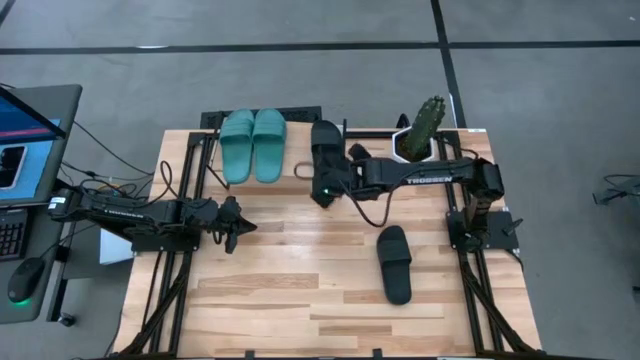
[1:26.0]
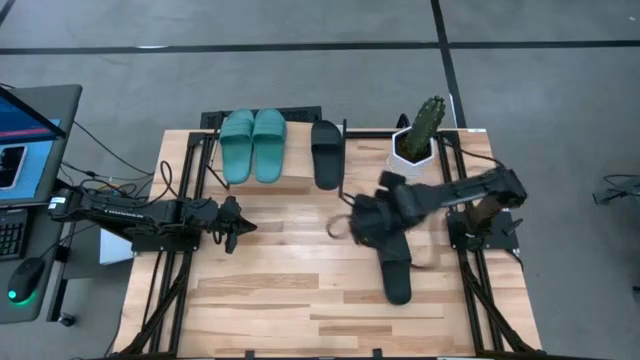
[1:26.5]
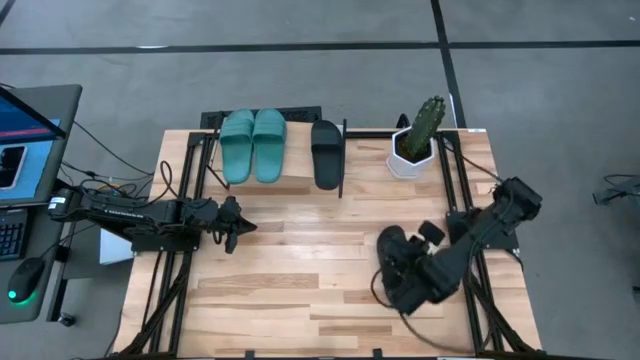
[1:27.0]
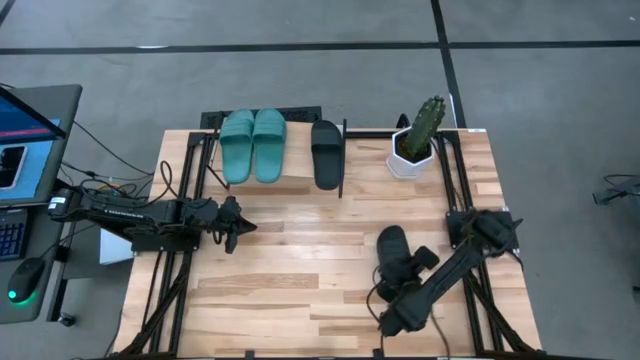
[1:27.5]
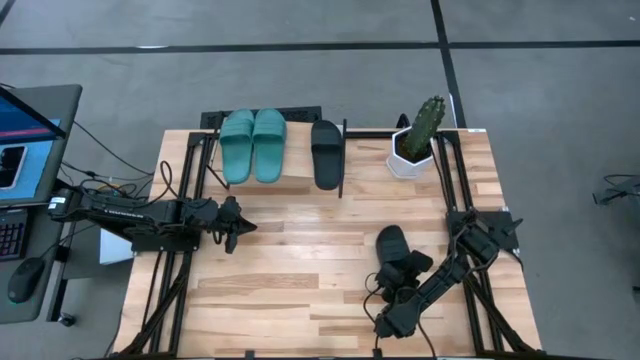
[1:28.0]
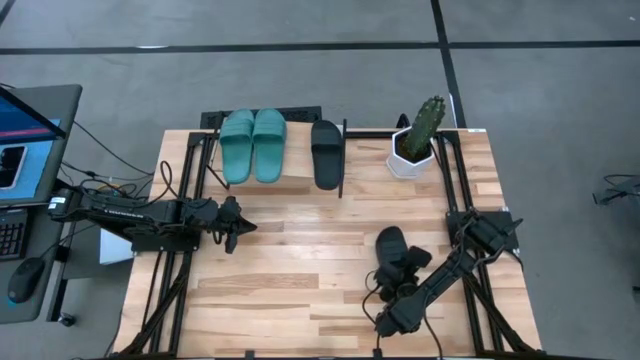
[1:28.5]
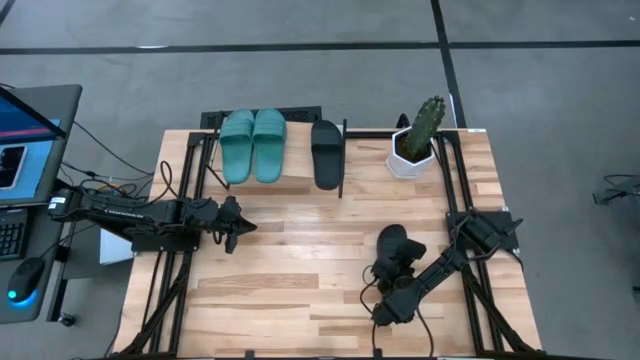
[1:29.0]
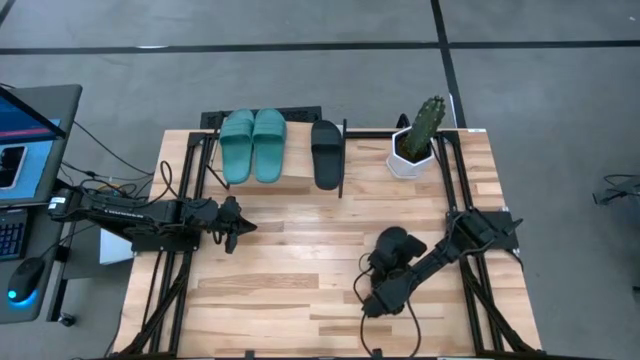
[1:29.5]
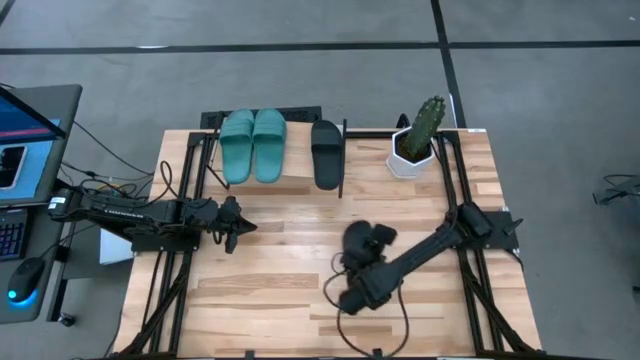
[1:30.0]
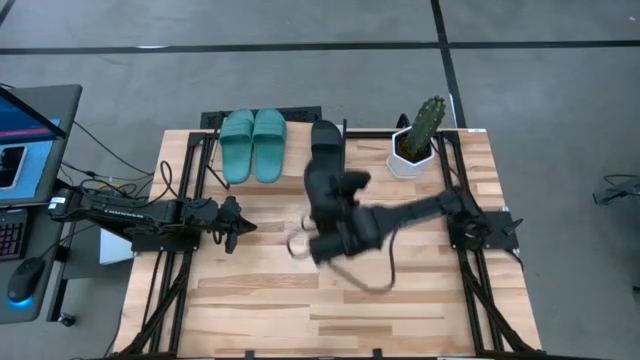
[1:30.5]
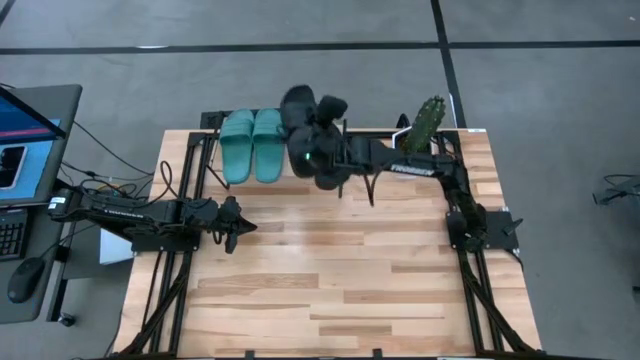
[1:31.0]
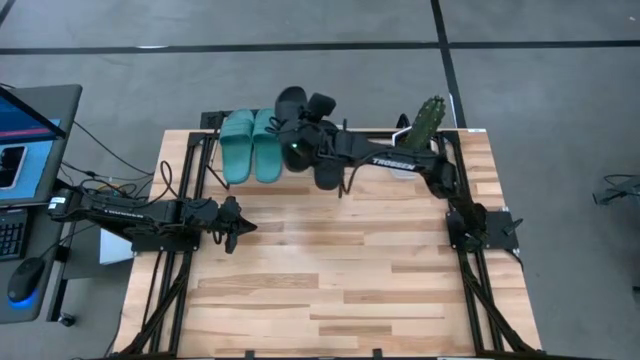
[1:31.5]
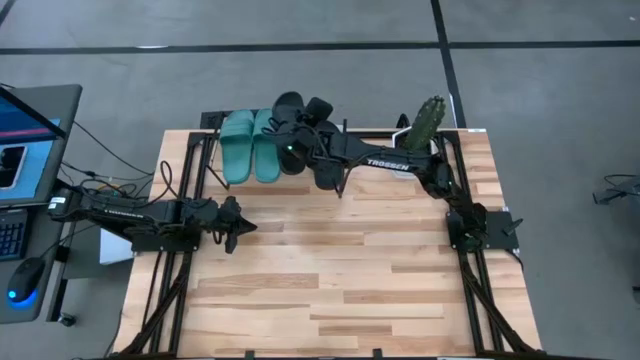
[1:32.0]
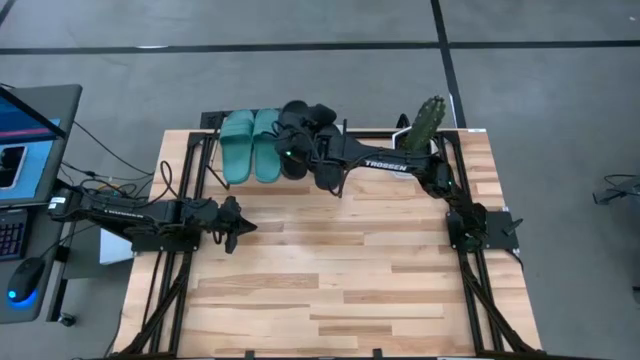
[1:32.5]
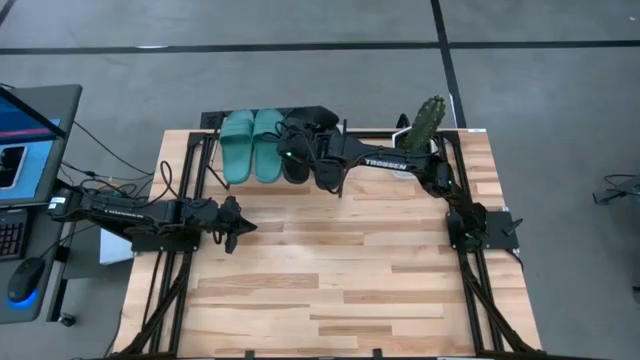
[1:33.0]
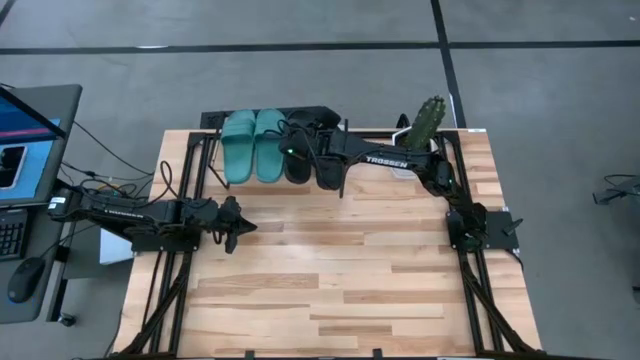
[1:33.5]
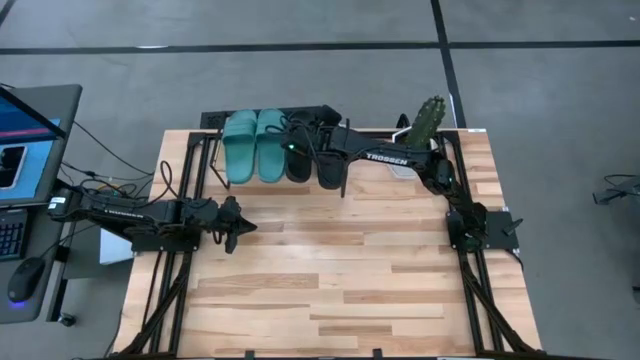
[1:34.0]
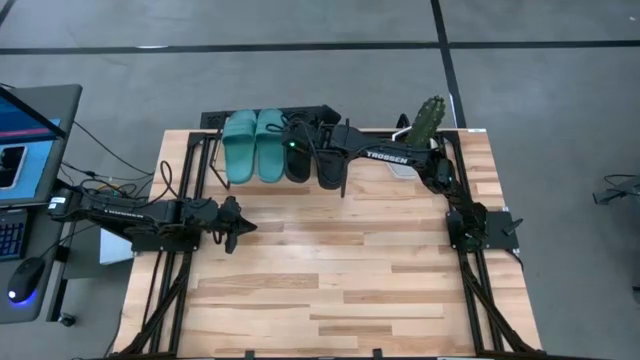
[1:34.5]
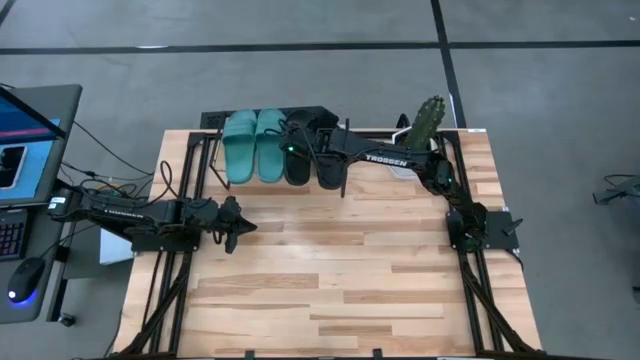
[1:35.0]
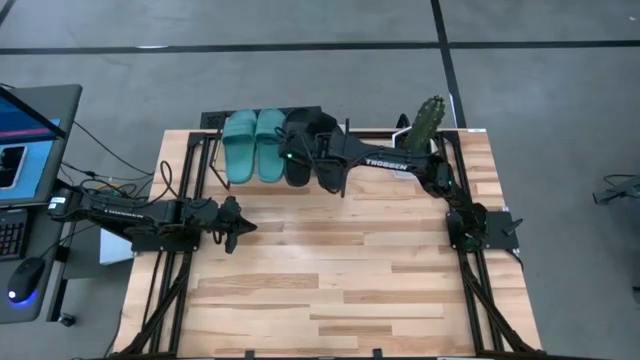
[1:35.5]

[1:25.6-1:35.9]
Task: Pick and place slides into the shelf
Put the black slide on the shelf

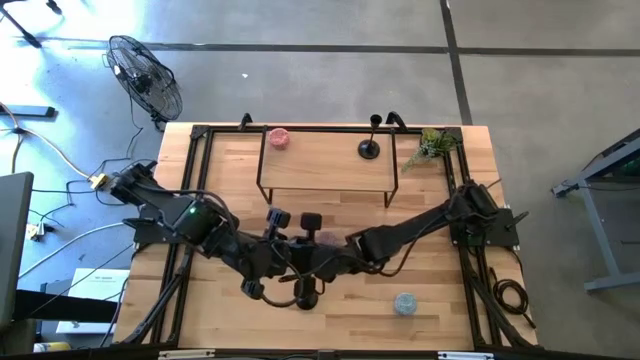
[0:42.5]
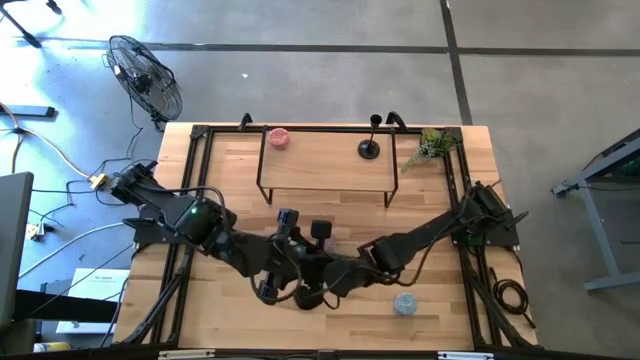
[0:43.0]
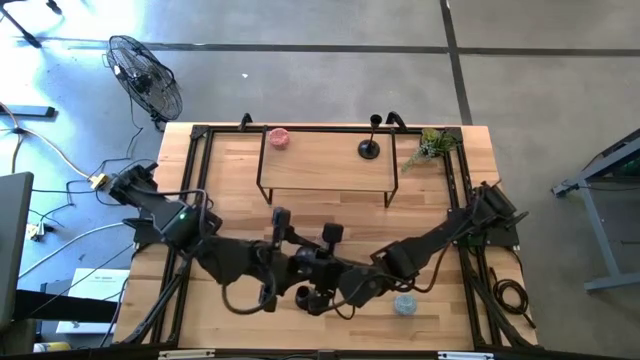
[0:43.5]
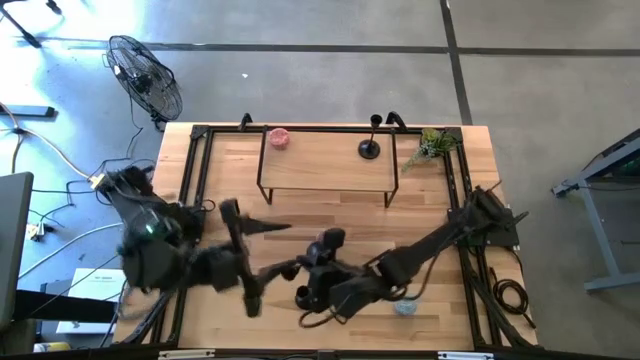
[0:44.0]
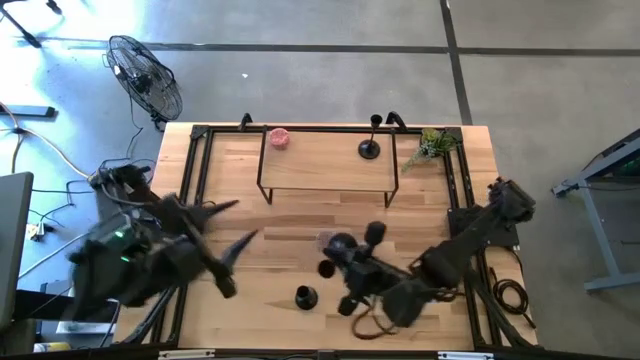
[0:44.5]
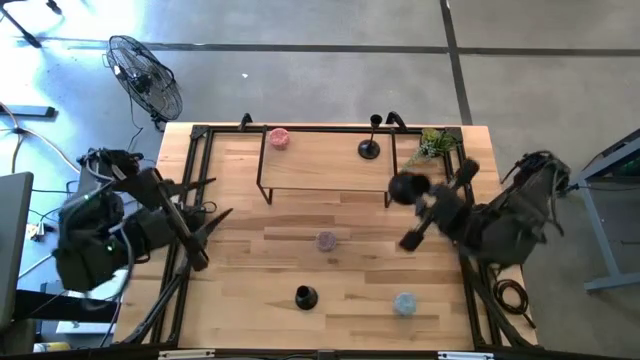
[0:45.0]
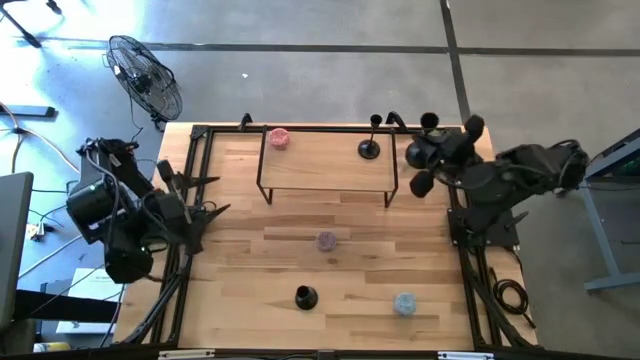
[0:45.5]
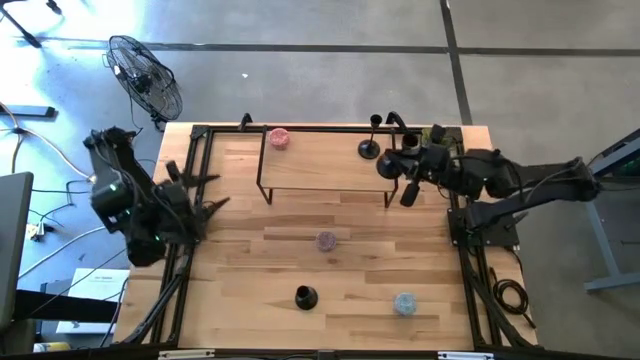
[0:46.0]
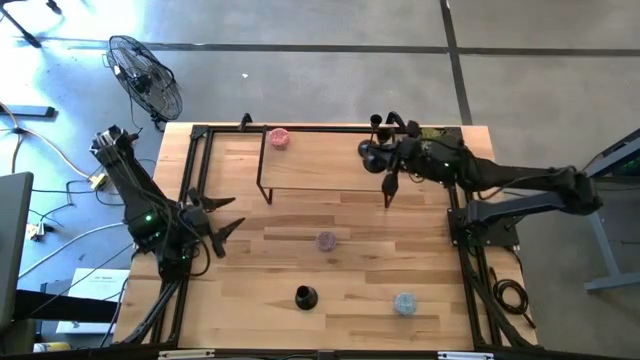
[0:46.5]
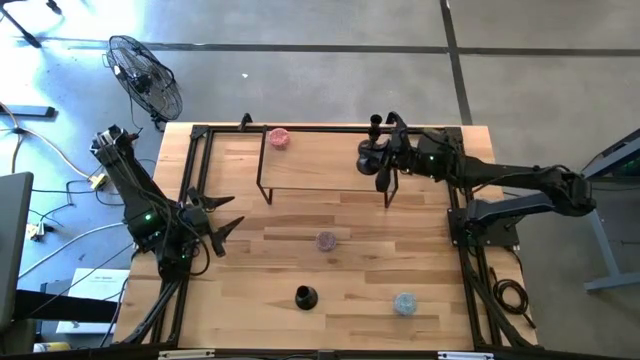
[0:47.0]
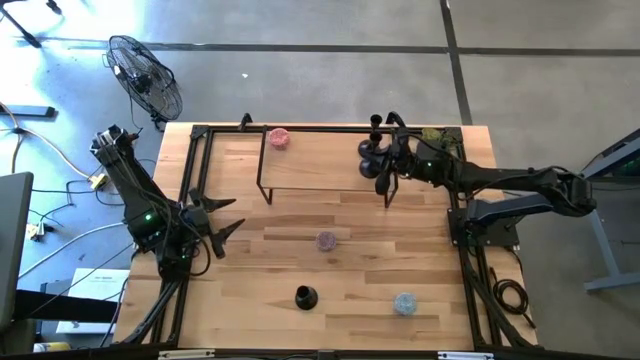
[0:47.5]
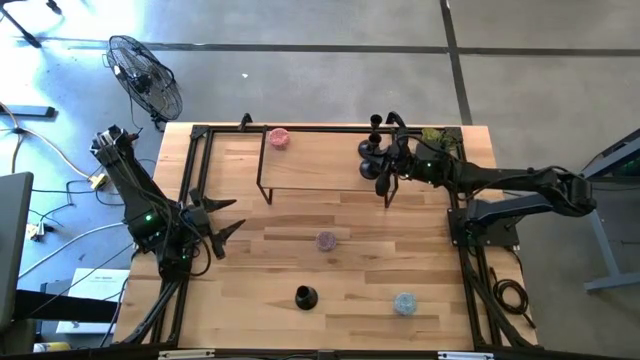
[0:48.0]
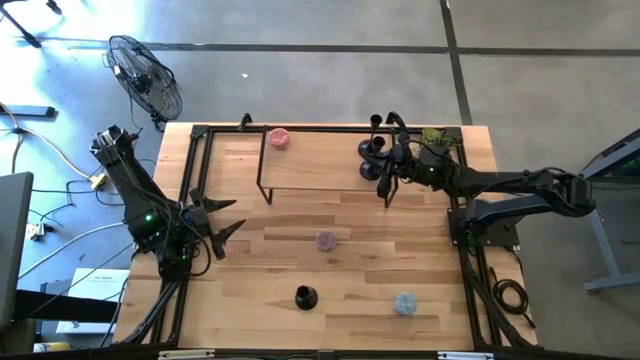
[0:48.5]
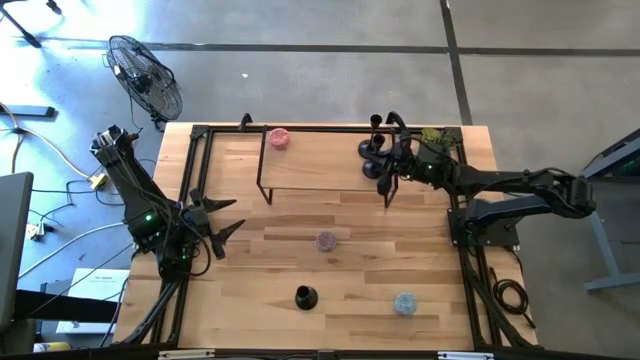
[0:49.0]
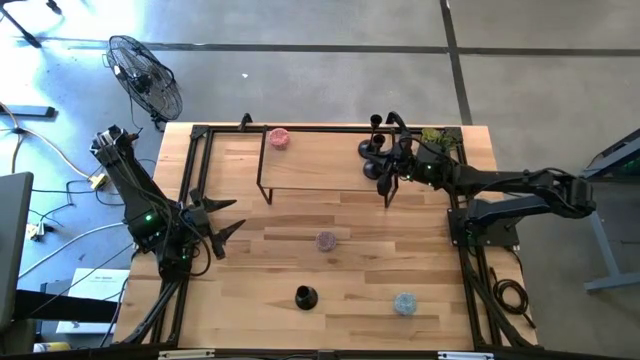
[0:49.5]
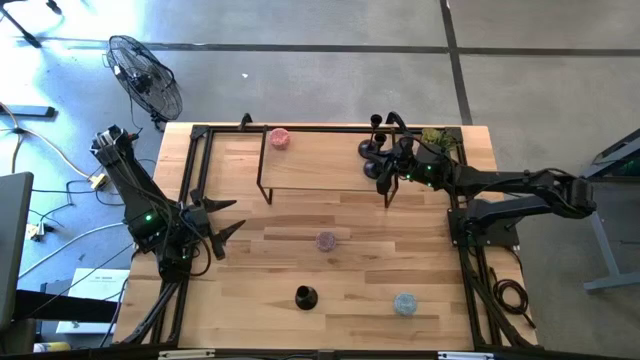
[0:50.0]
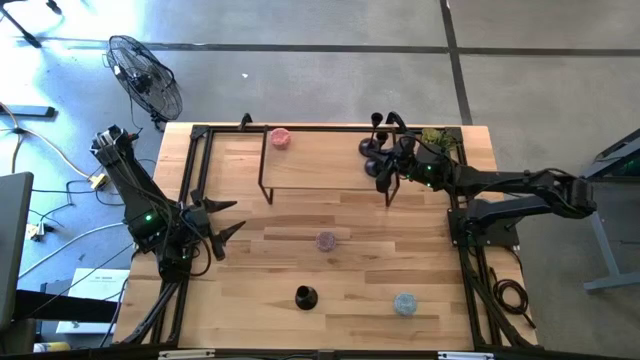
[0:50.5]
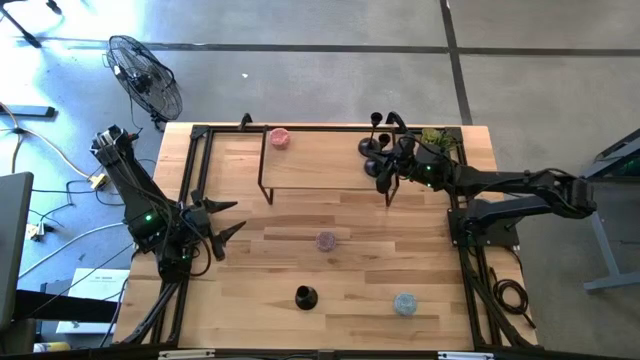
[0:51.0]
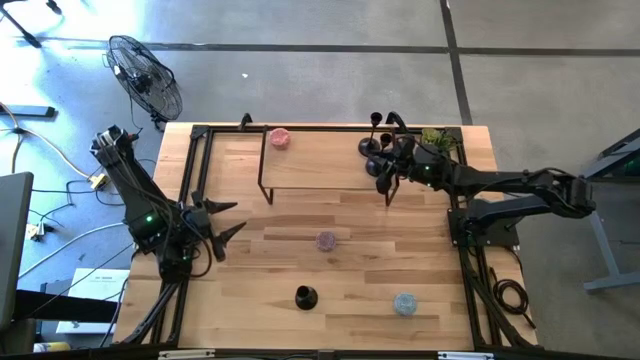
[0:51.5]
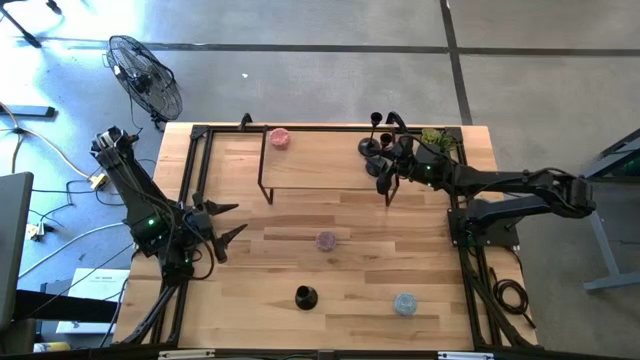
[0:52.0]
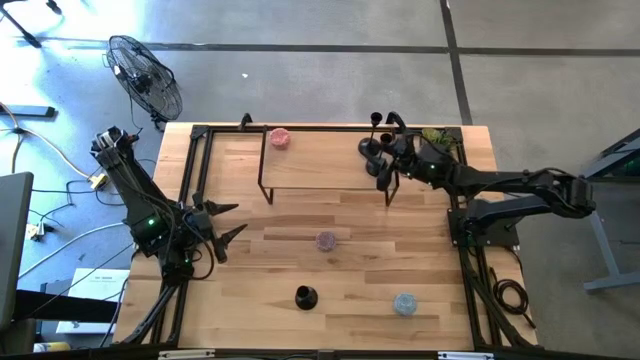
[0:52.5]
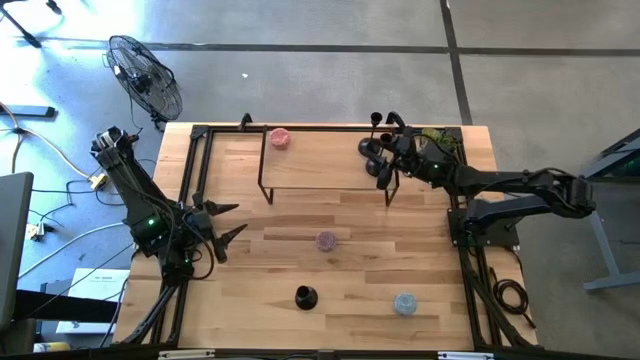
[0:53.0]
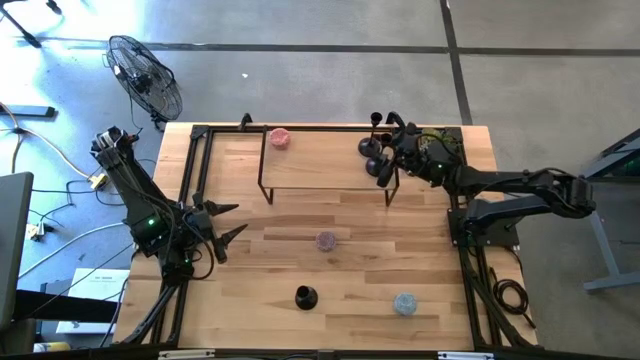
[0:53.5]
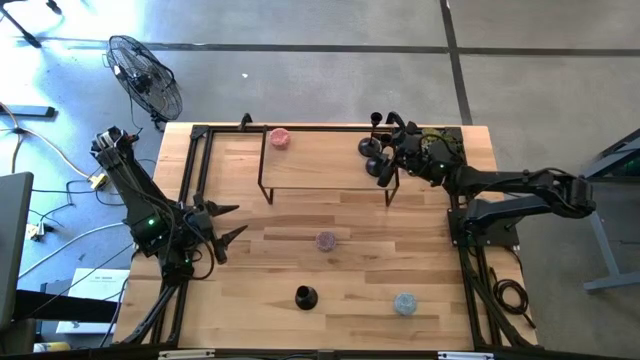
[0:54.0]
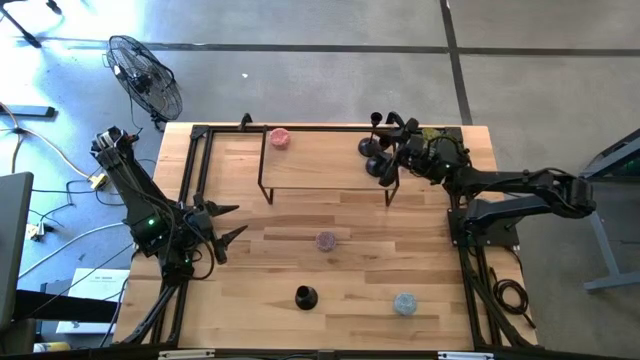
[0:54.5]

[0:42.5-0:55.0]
Task: Pick & Place candle stick holders
Put the left black candle holder on the shelf
